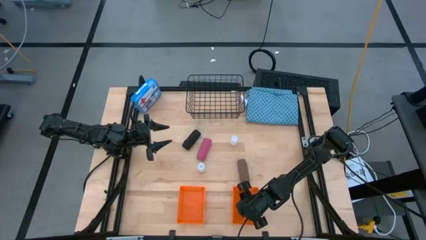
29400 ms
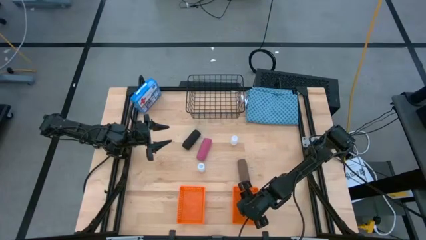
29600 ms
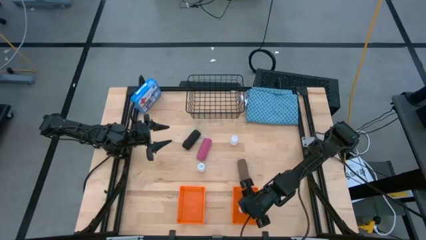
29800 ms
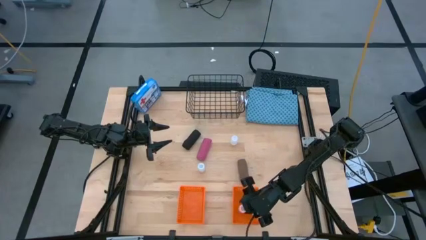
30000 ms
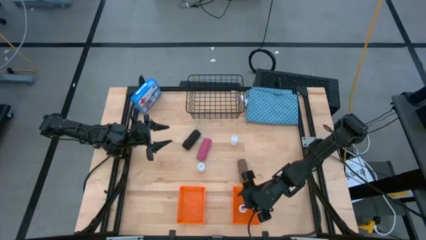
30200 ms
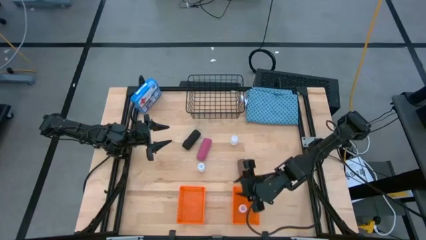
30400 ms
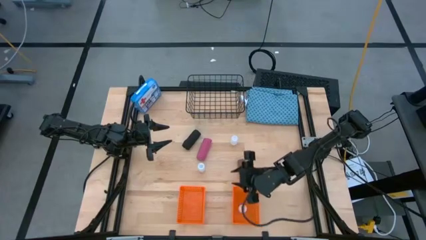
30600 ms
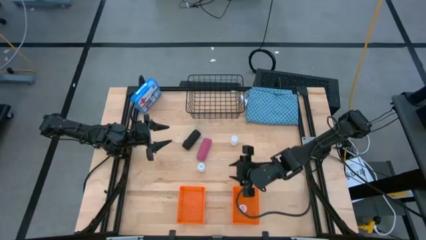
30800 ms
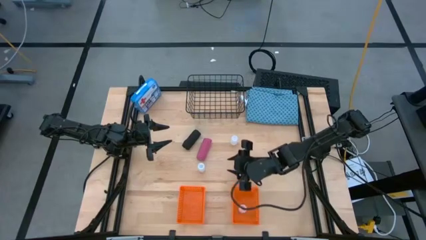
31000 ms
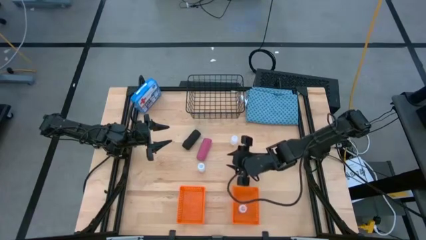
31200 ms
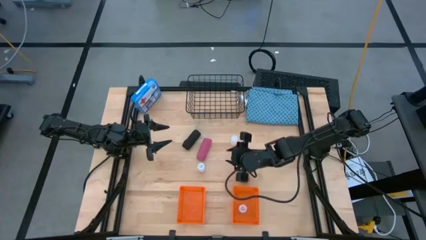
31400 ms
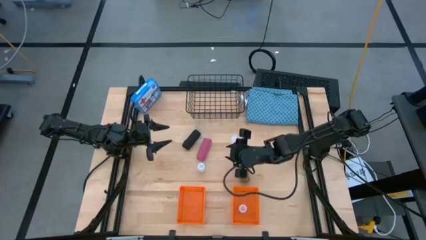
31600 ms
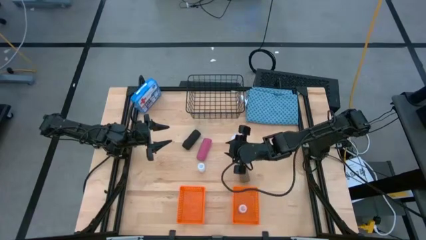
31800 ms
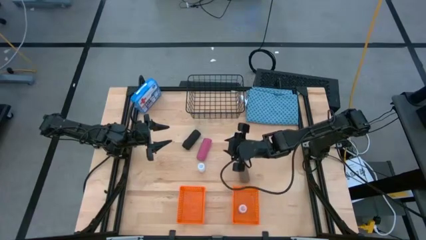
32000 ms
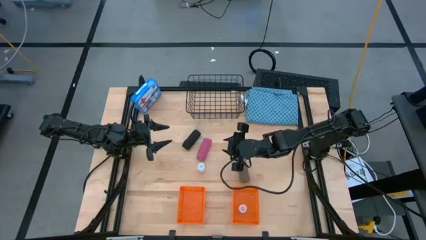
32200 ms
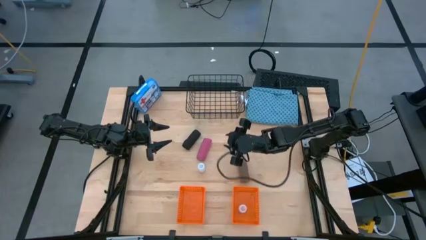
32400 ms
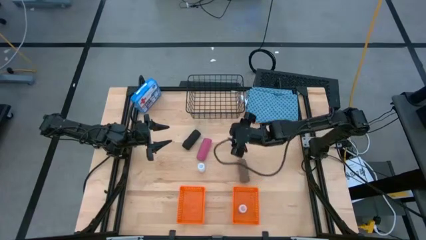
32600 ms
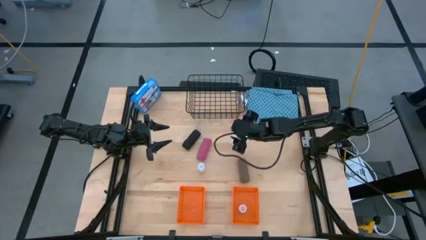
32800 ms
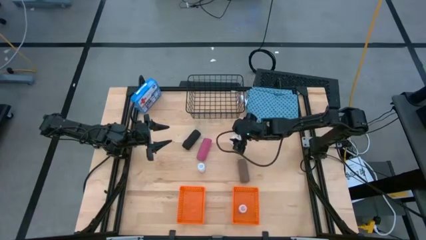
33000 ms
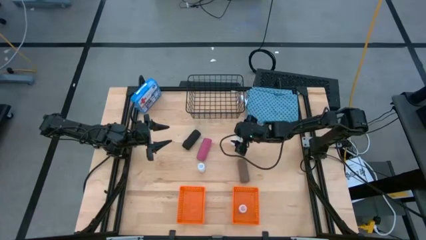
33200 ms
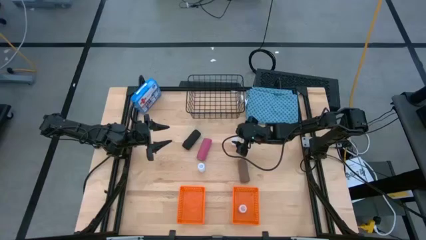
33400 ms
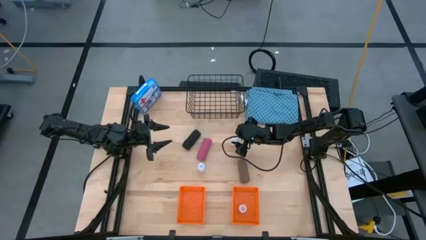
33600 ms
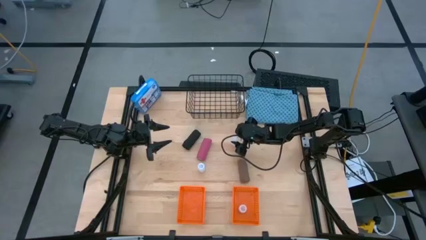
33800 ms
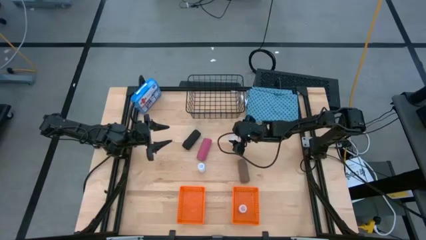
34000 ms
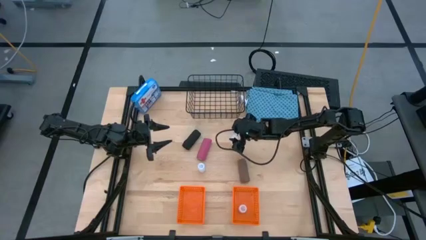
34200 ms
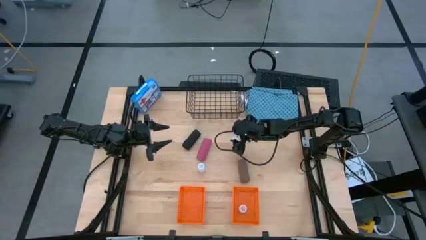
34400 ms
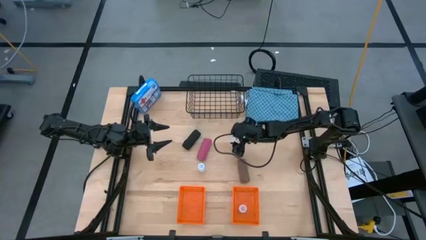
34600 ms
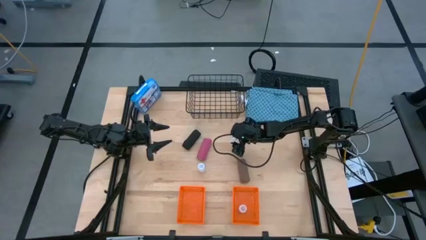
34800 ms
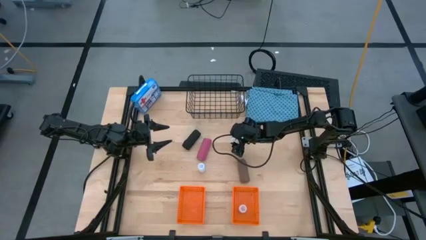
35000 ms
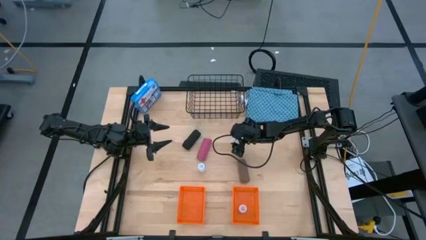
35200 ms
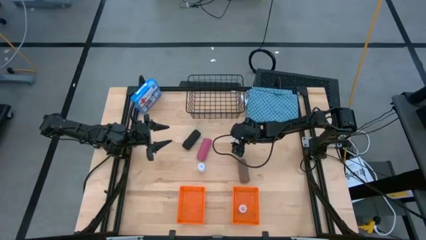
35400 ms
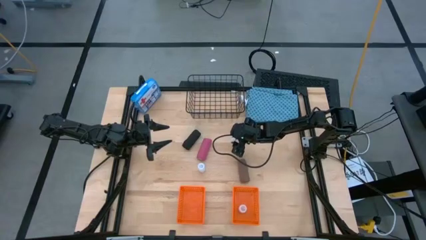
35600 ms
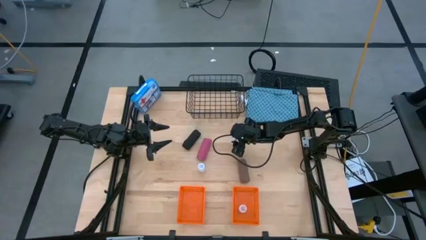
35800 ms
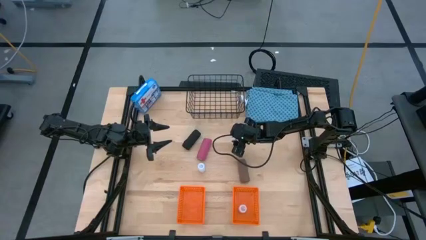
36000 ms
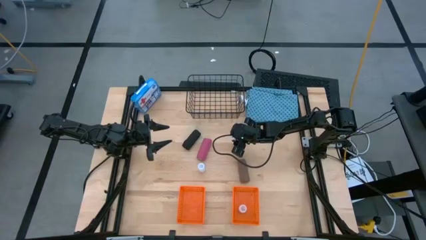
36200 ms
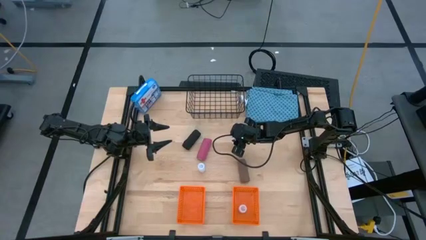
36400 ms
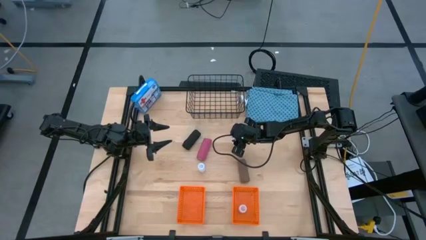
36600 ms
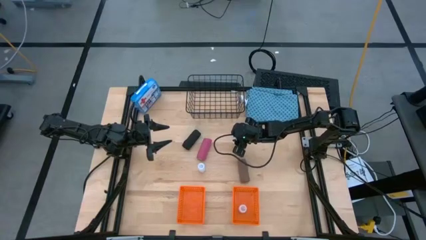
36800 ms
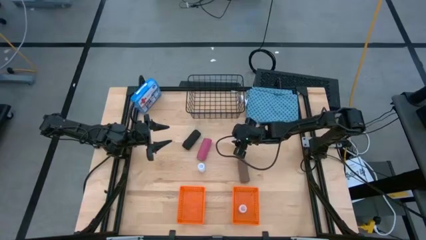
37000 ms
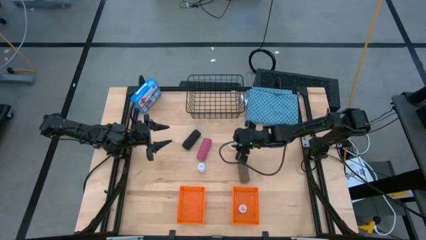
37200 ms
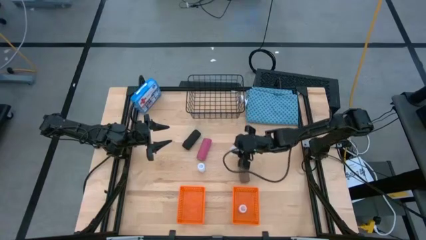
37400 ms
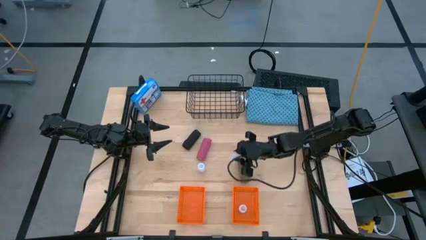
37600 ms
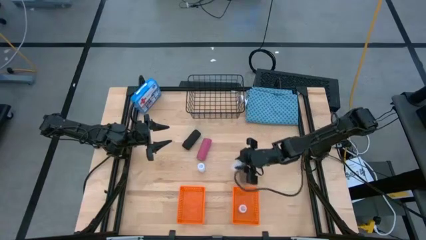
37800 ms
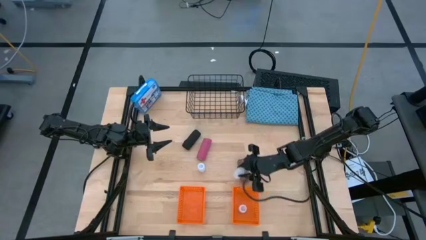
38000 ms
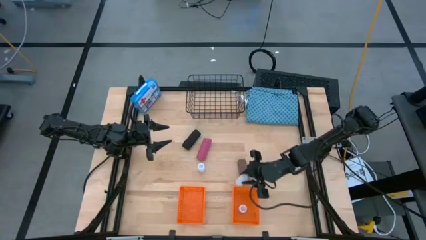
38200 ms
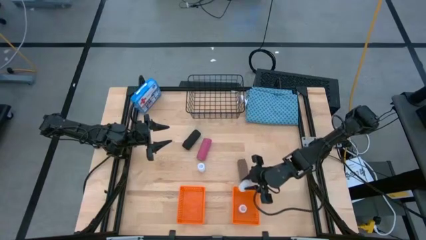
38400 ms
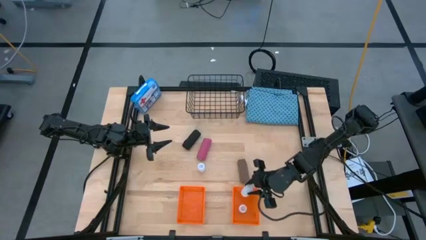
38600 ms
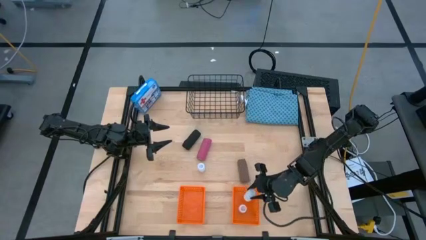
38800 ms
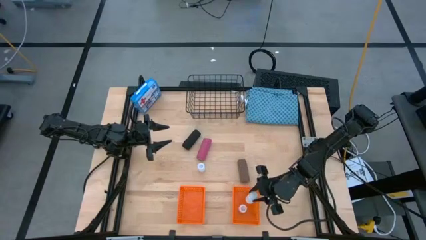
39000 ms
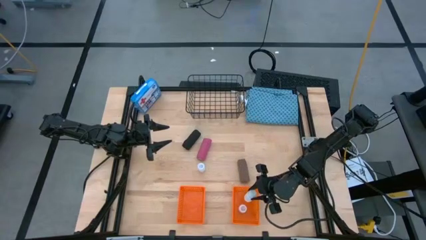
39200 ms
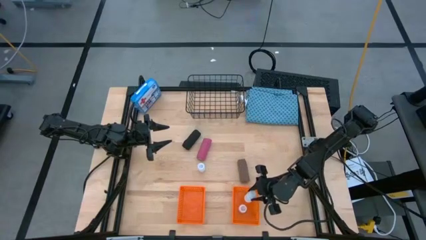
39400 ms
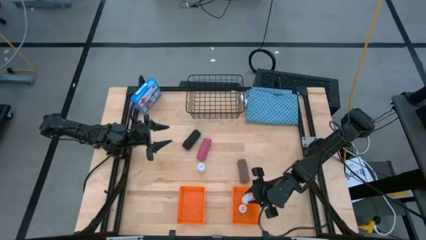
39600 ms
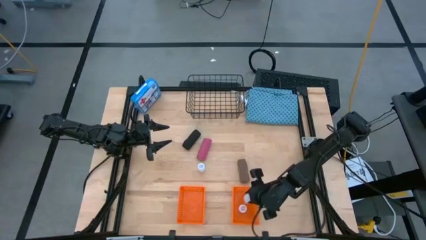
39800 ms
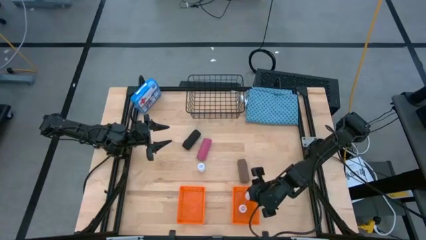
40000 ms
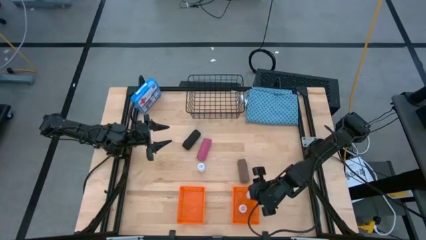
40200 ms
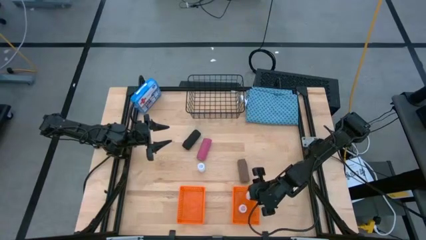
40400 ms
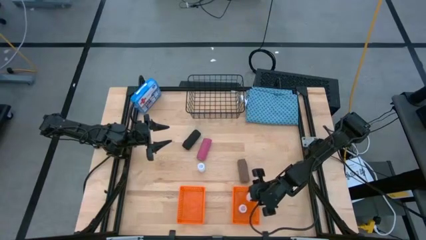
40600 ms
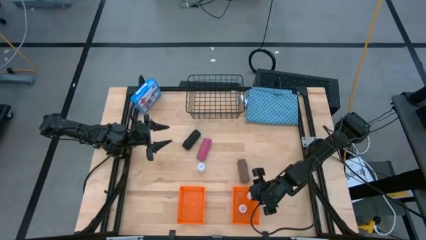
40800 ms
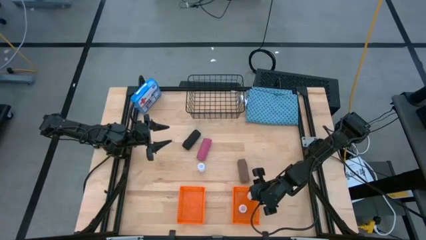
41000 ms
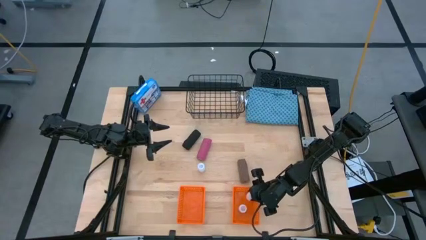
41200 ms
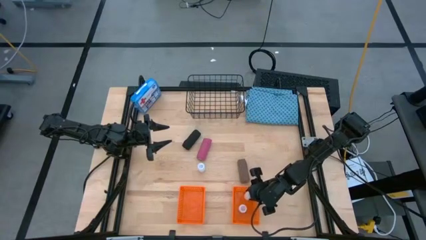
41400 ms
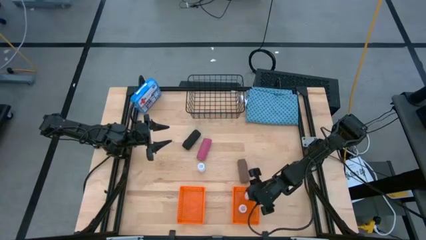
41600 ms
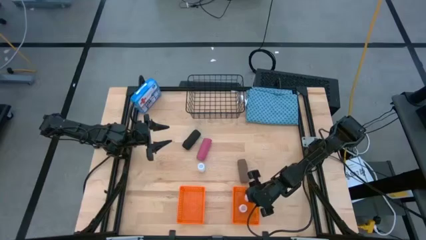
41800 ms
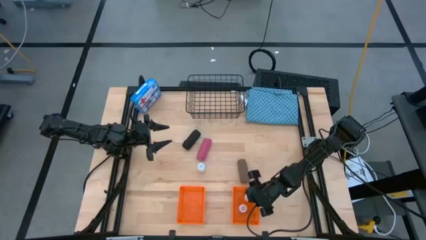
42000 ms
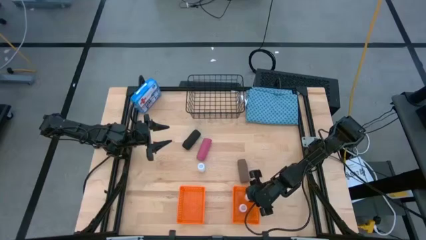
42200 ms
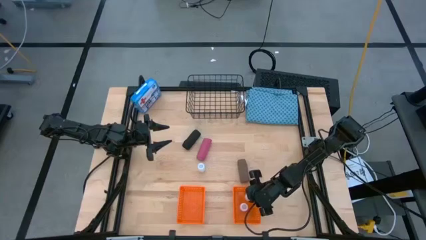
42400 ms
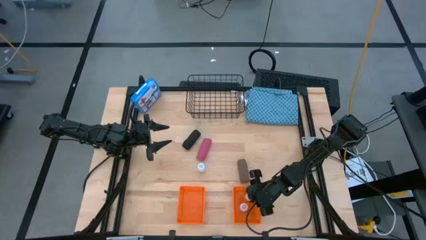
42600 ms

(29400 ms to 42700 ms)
Task: Pick & Place Medicine items
Put the top transparent pill bottle into the right orange basket
